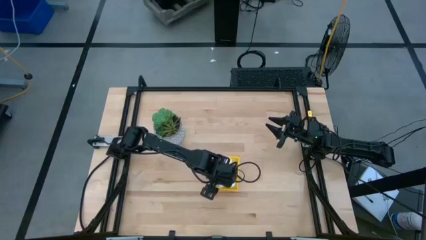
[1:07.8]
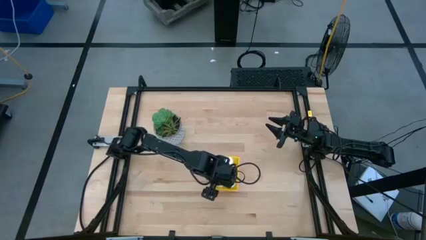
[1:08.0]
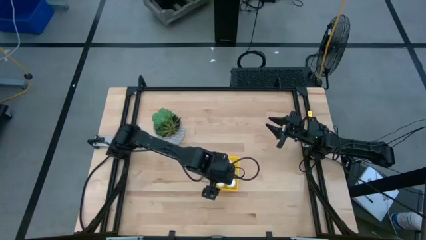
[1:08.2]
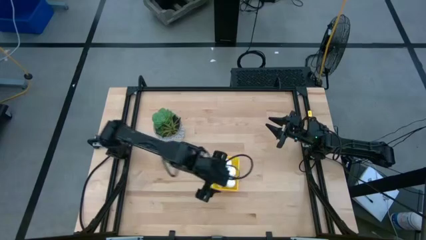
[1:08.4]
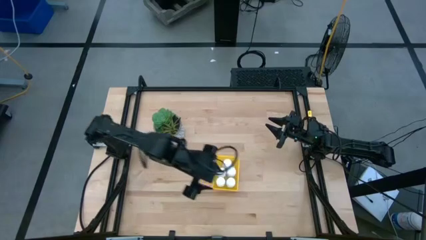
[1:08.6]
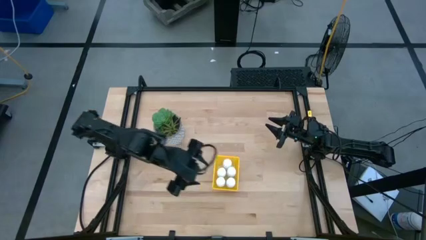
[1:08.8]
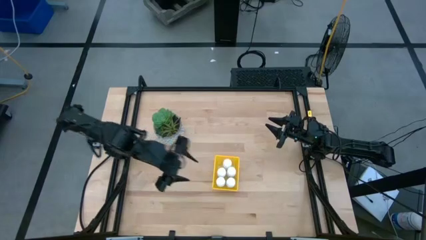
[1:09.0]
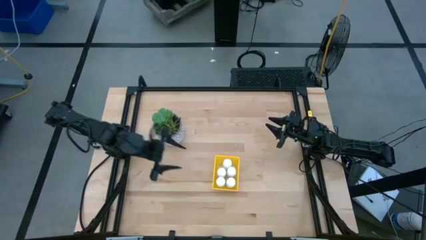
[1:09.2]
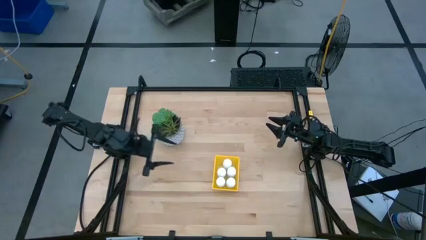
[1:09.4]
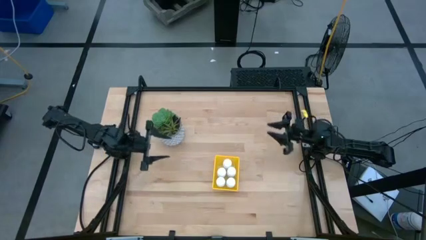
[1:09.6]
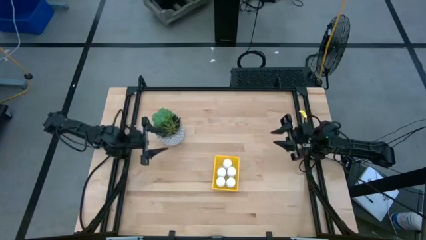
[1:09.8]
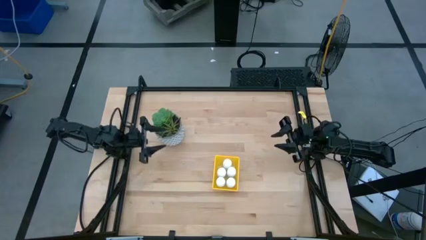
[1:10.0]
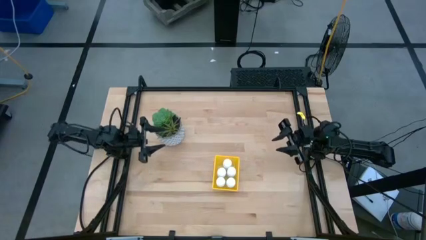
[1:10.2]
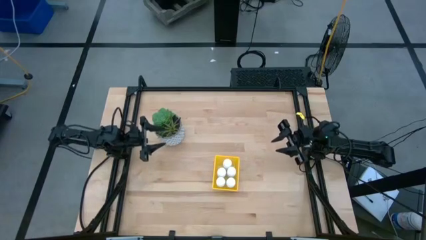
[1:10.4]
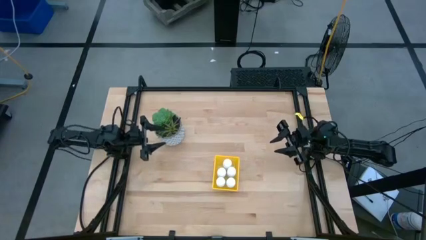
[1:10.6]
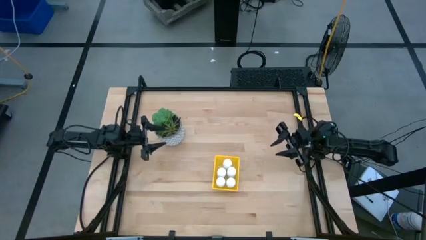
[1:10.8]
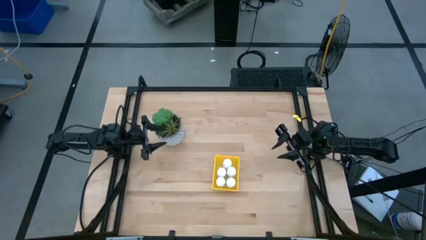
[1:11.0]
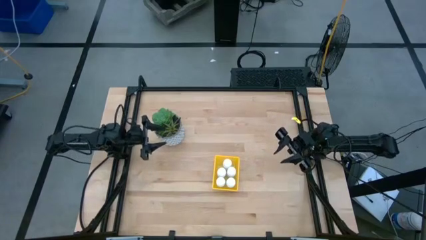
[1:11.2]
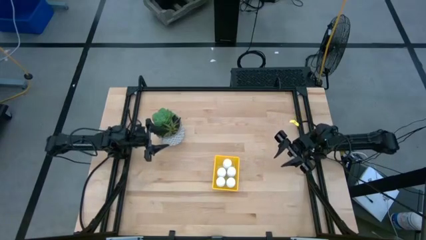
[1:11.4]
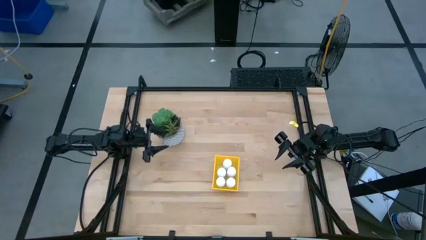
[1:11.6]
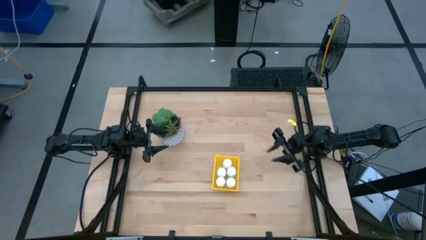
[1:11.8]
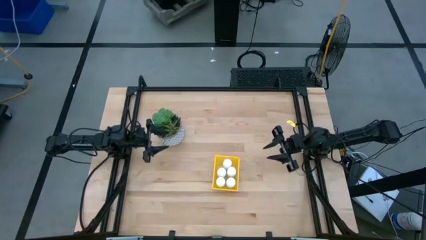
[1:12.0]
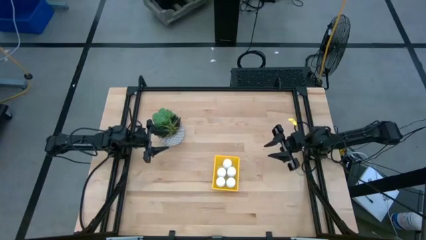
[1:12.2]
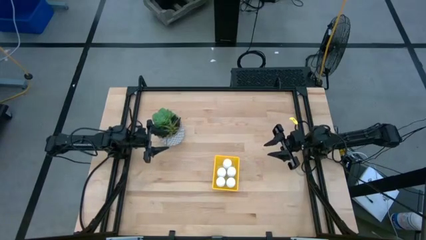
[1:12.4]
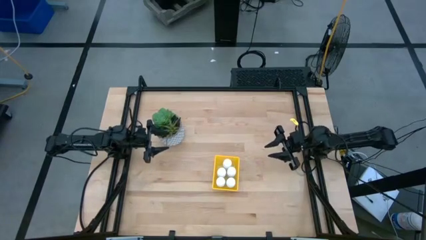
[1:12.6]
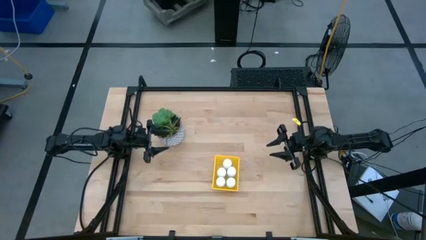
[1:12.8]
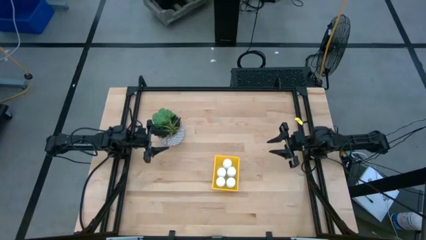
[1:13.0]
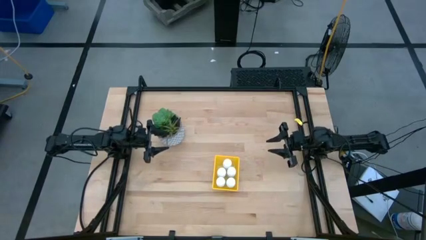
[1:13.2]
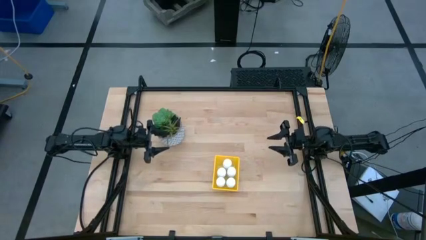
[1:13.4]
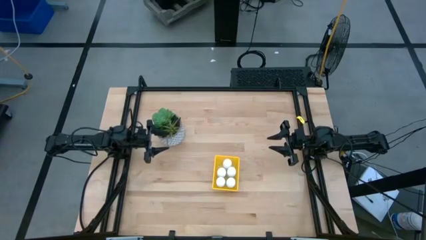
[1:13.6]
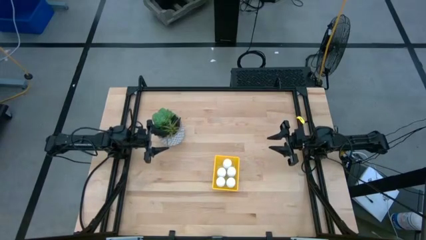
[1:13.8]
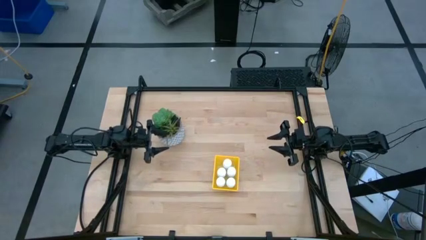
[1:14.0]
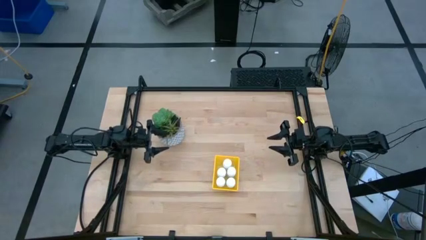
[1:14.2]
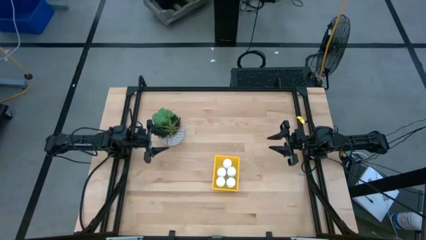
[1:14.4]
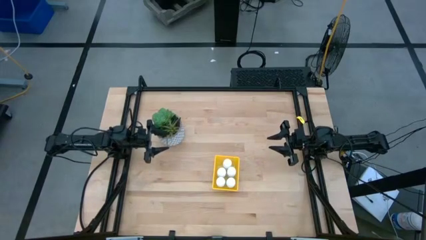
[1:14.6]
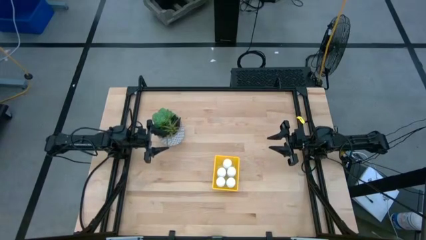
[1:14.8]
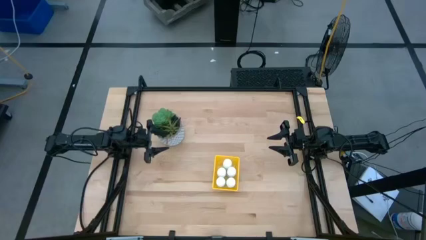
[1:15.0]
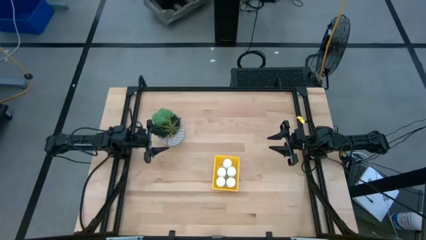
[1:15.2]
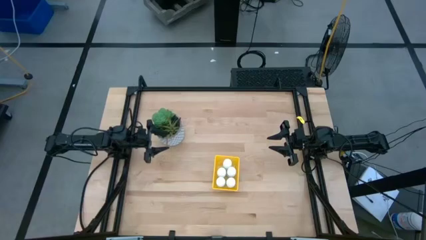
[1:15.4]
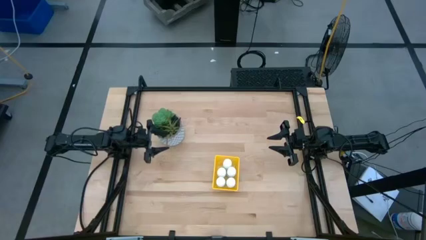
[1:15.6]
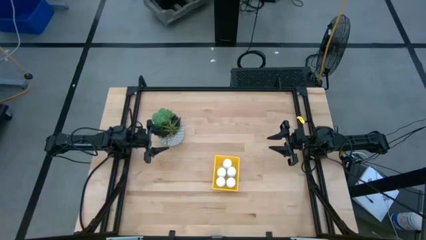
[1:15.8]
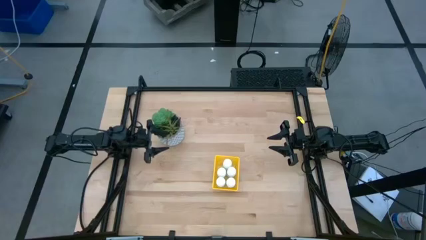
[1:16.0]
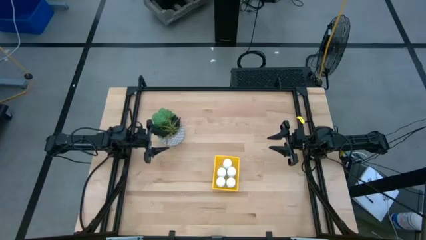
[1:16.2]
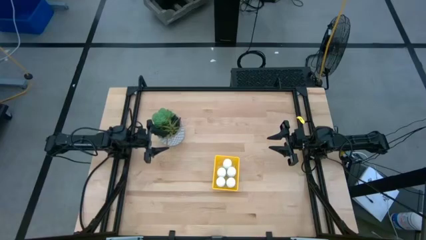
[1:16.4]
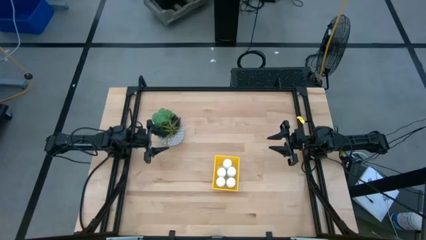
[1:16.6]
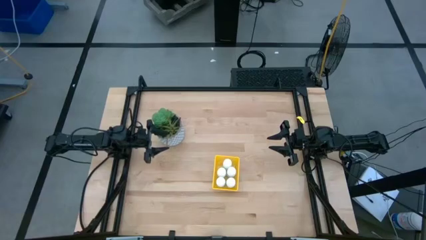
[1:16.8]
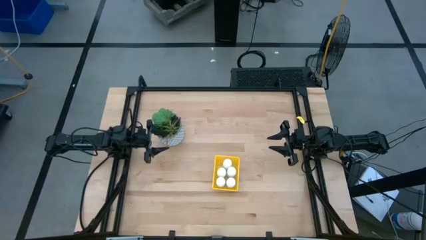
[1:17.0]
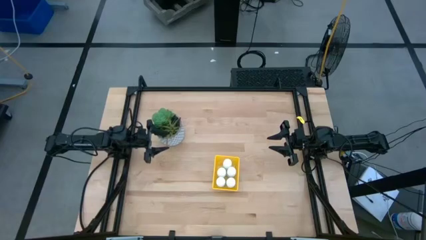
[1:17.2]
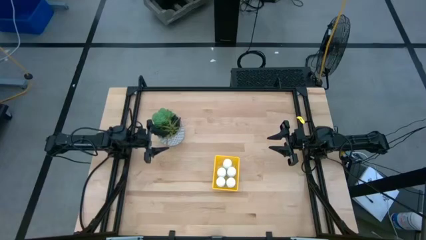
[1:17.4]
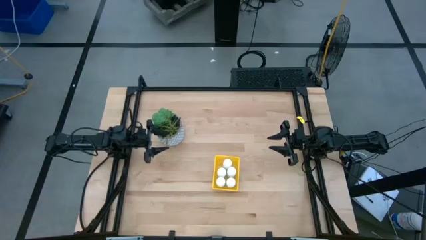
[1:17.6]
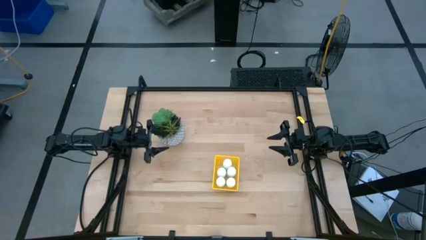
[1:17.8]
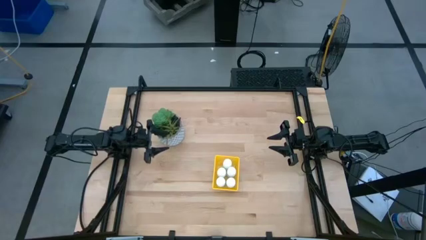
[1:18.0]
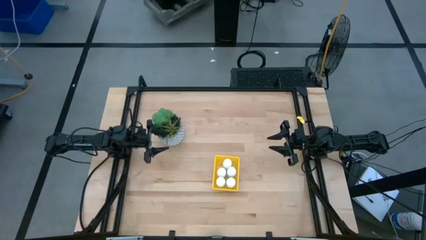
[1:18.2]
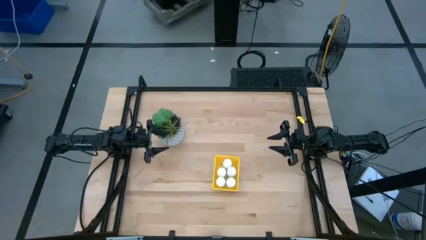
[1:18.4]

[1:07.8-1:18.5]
Task: Pick and place pill bottles into a basket
Return to Home Position
